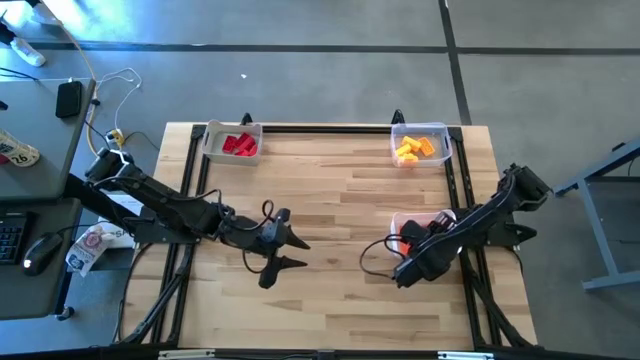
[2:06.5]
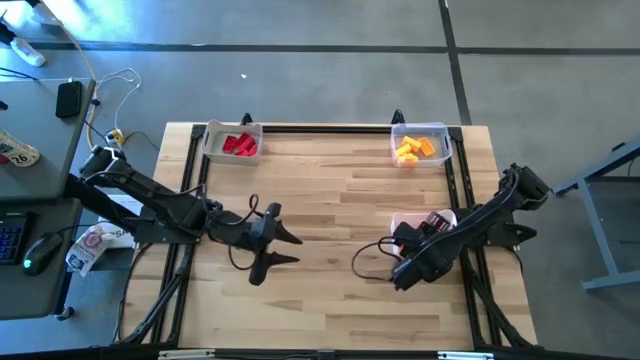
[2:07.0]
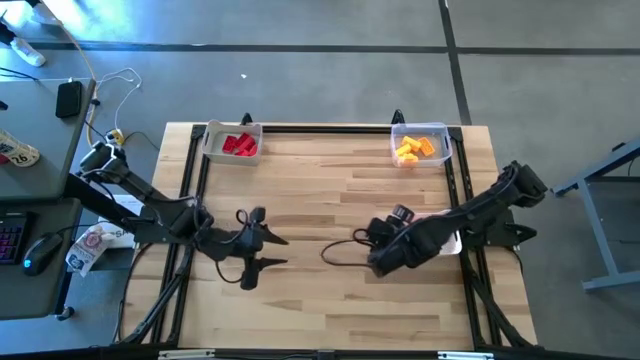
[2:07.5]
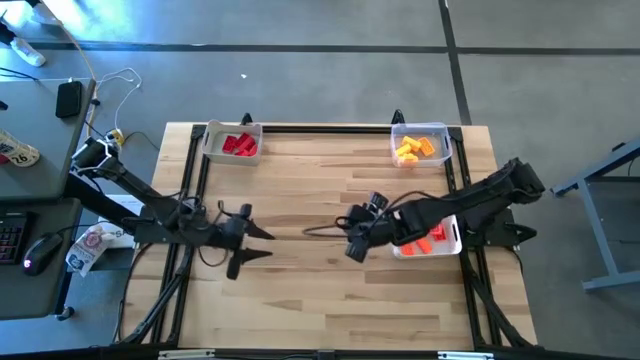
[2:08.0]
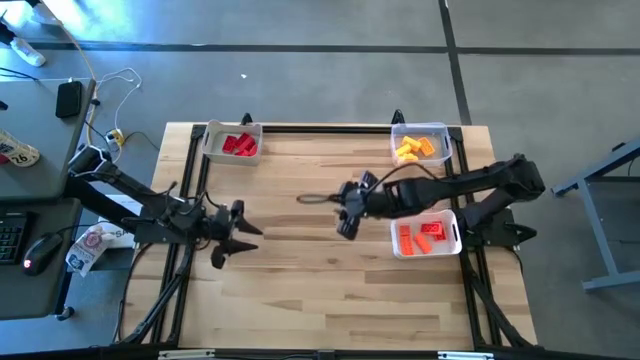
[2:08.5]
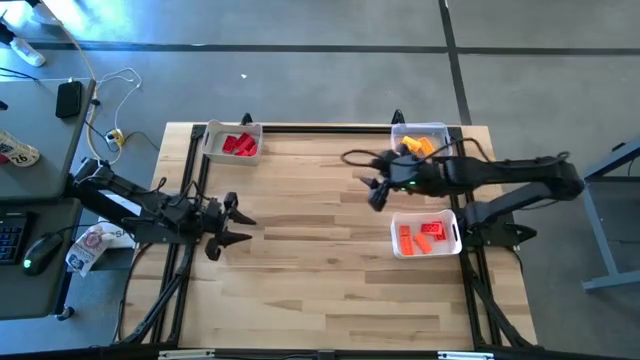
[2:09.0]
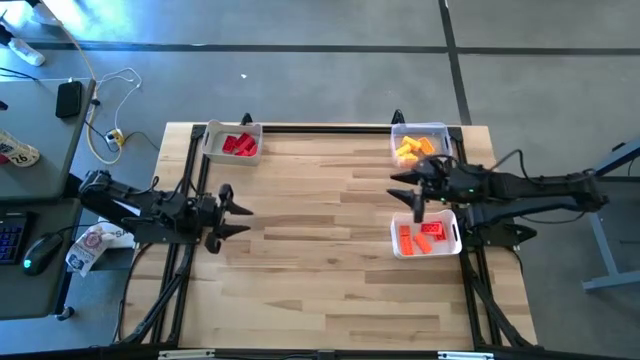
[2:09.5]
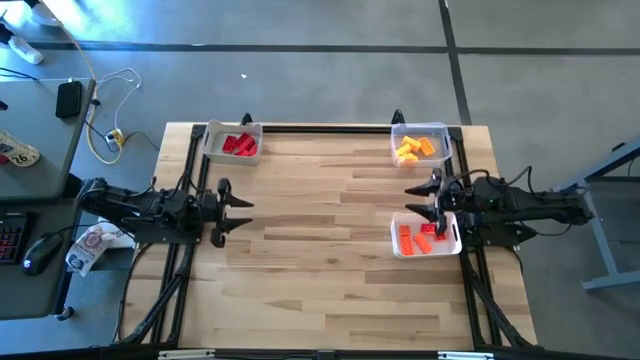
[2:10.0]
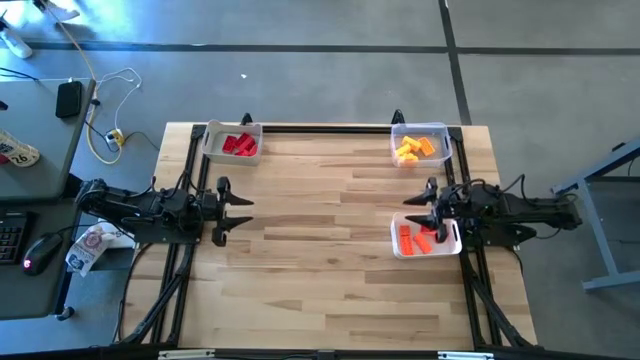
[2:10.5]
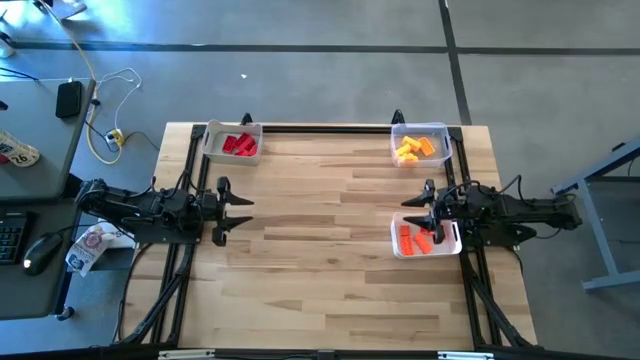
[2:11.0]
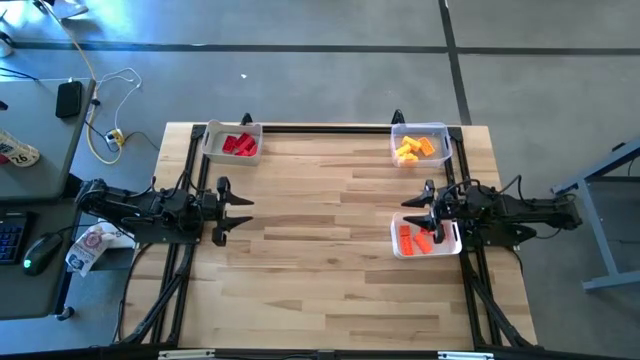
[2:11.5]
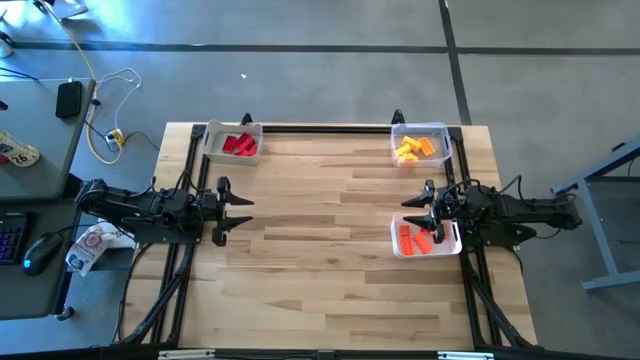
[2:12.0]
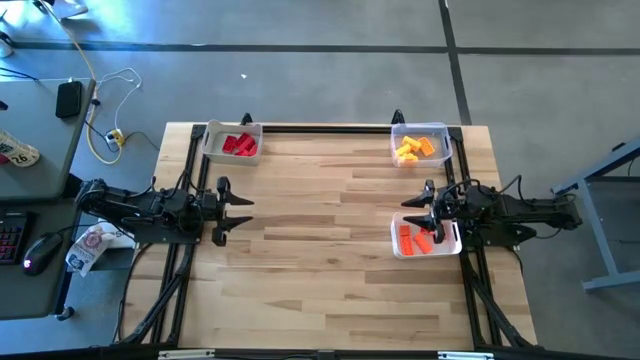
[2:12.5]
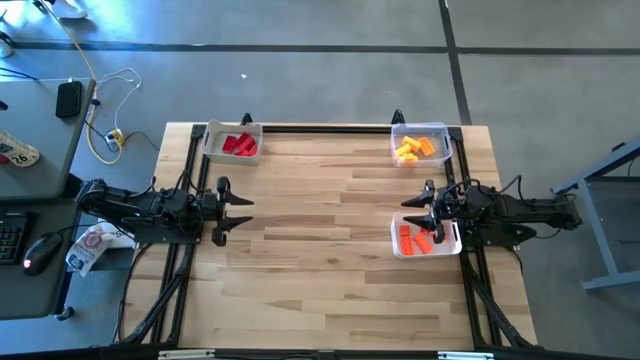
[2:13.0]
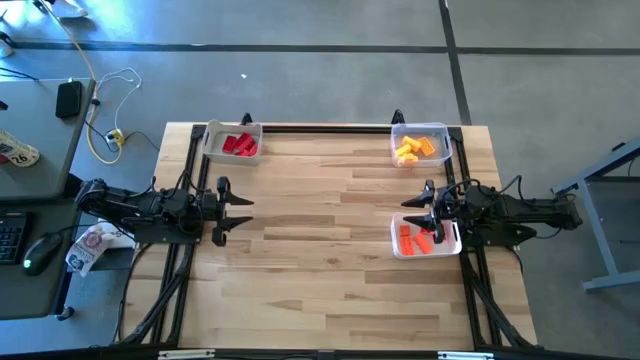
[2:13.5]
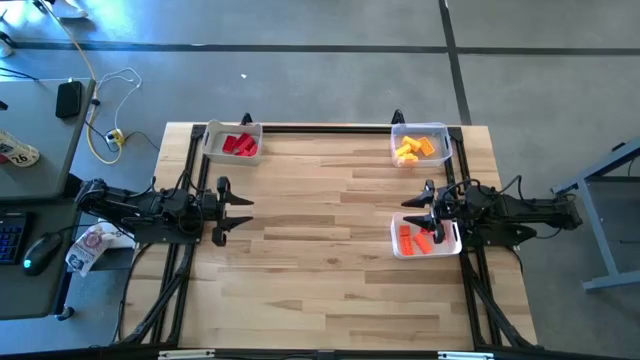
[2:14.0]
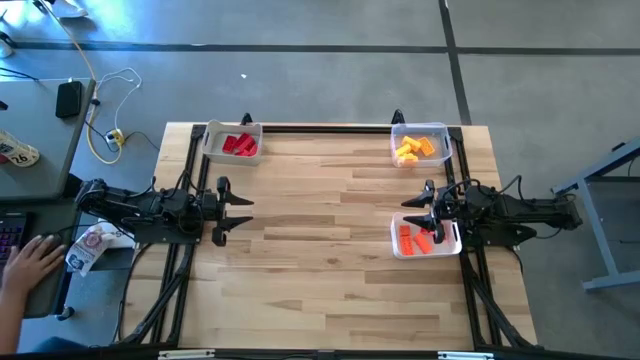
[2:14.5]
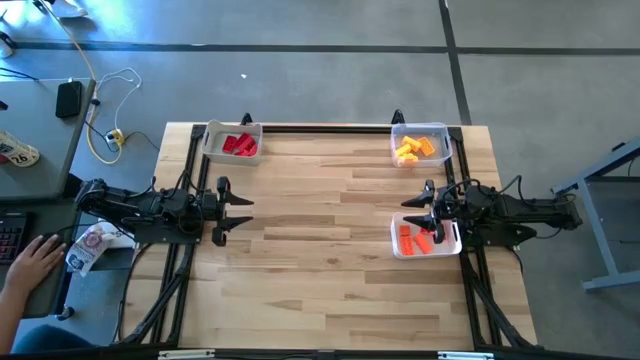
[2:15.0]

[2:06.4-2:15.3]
Task: Sort & place blocks by color
Return to Home Position

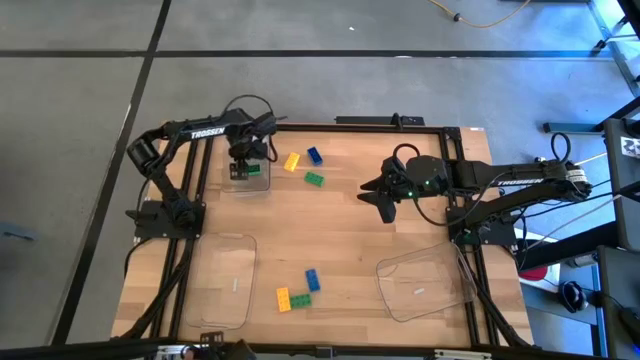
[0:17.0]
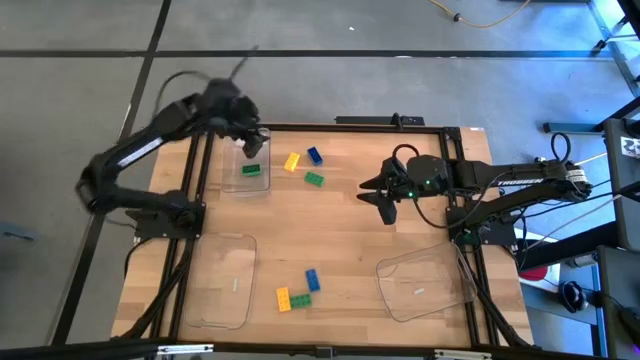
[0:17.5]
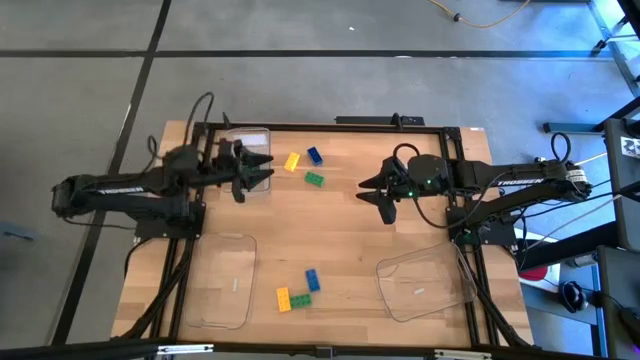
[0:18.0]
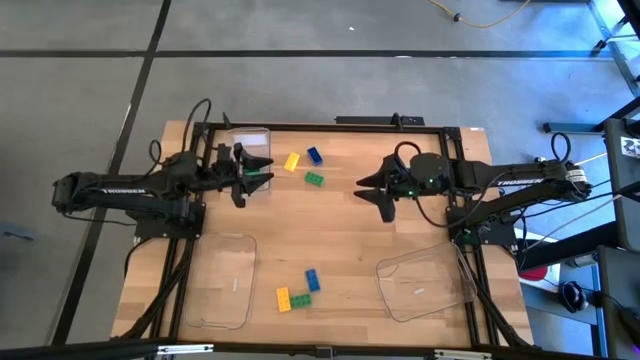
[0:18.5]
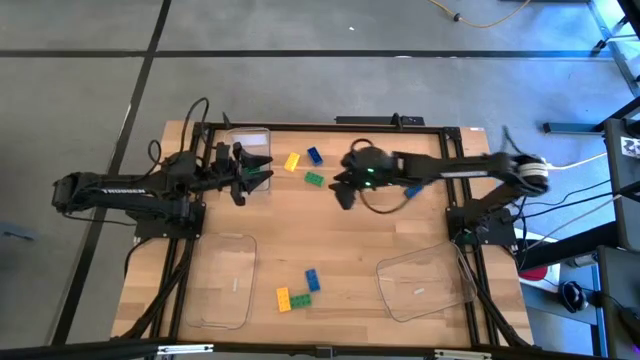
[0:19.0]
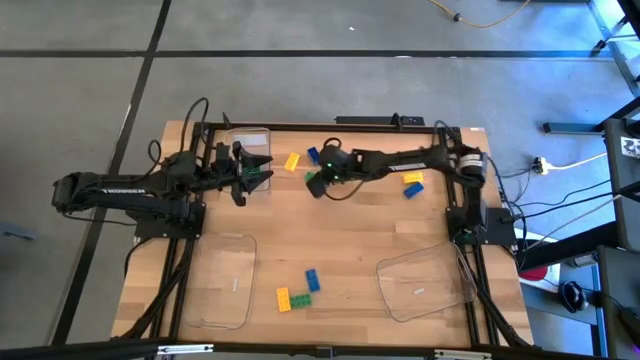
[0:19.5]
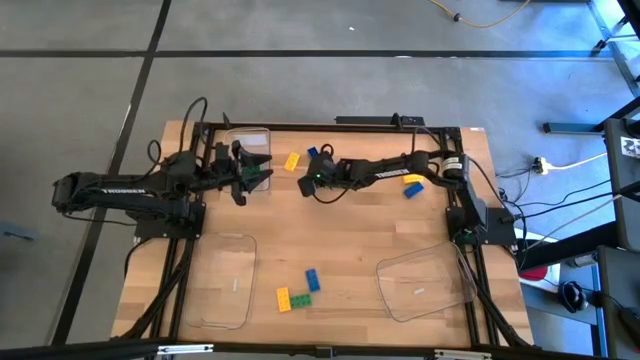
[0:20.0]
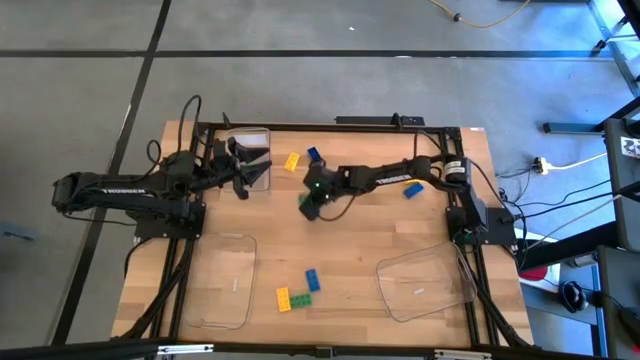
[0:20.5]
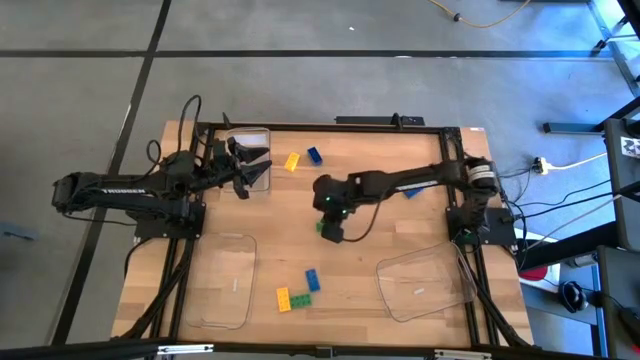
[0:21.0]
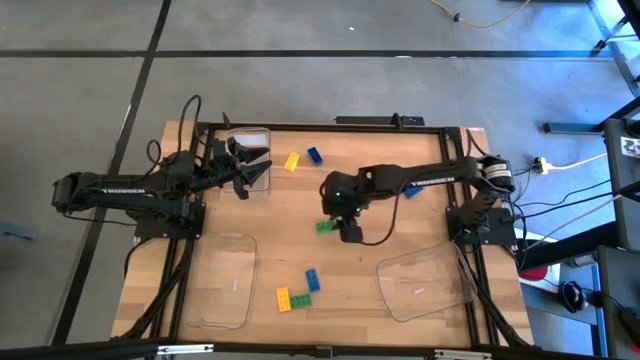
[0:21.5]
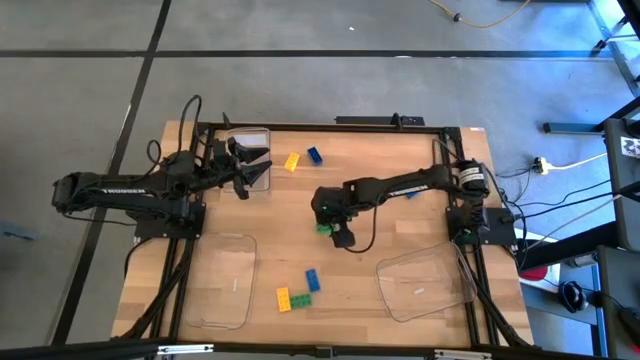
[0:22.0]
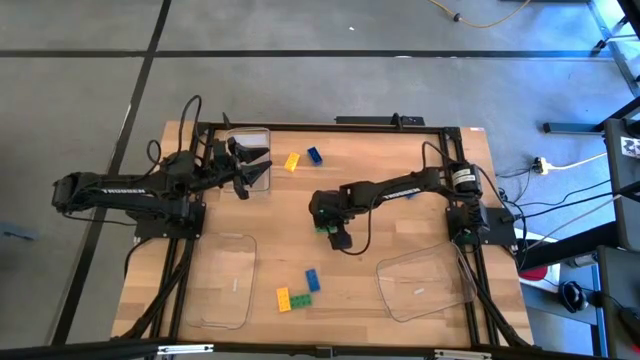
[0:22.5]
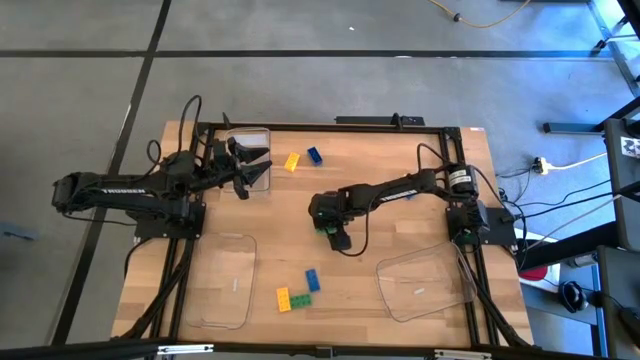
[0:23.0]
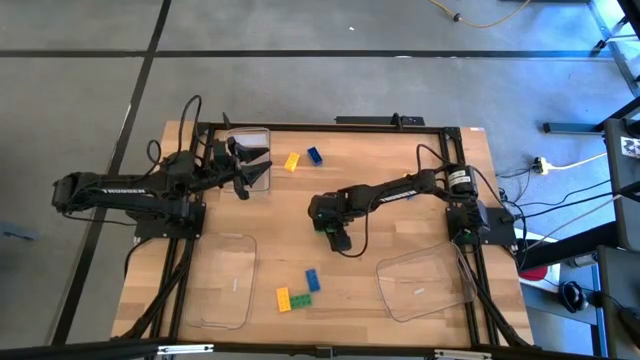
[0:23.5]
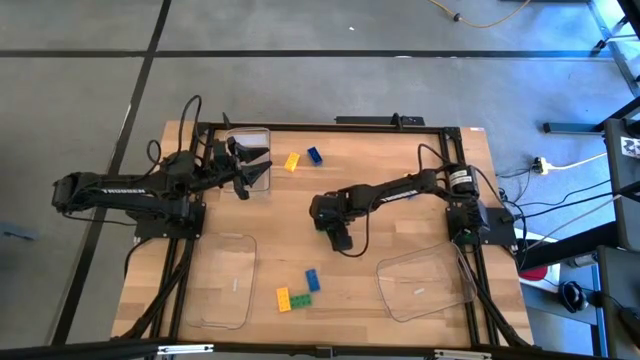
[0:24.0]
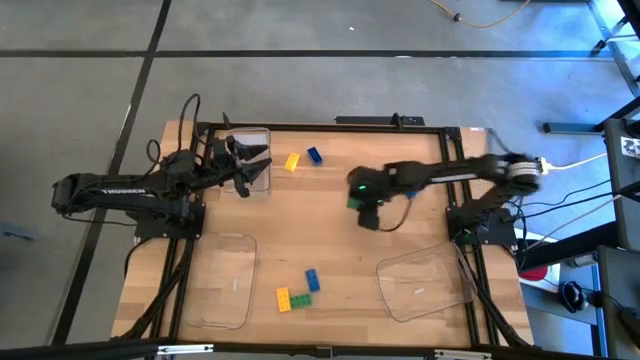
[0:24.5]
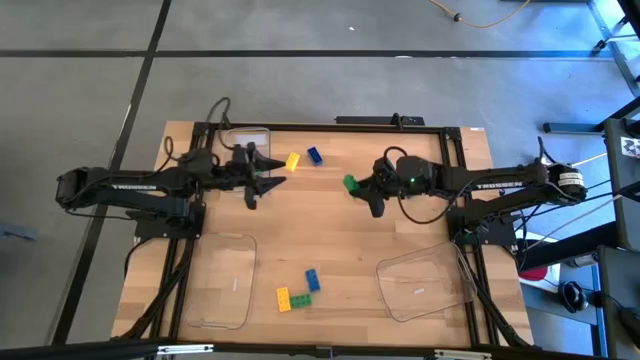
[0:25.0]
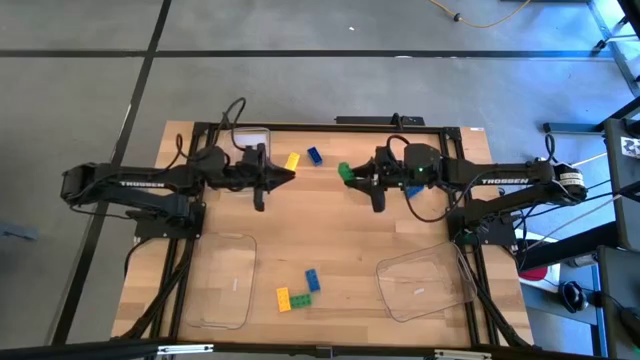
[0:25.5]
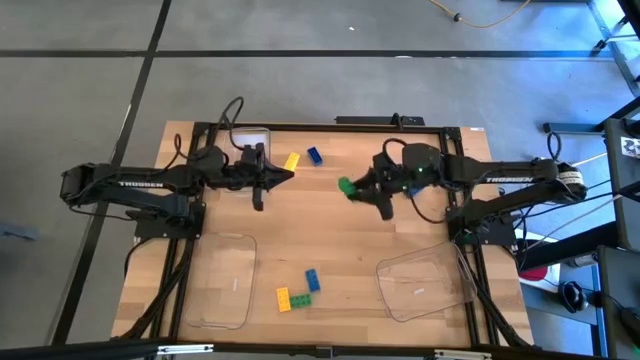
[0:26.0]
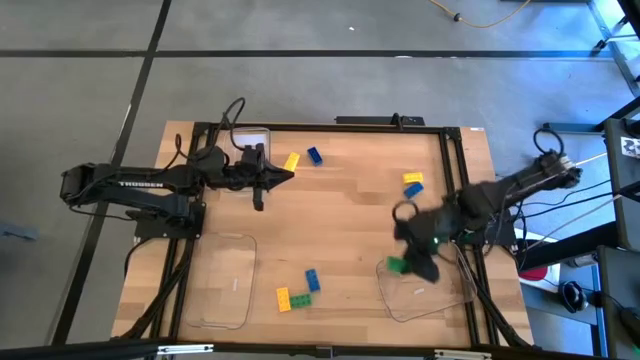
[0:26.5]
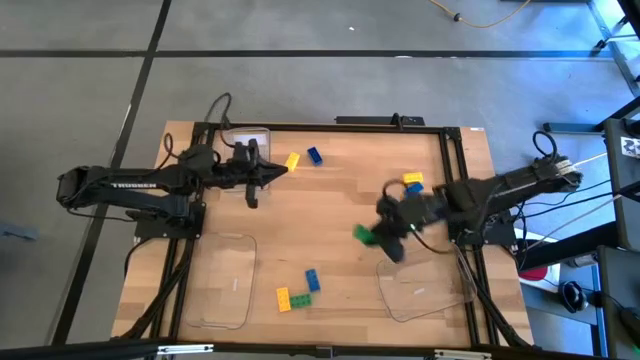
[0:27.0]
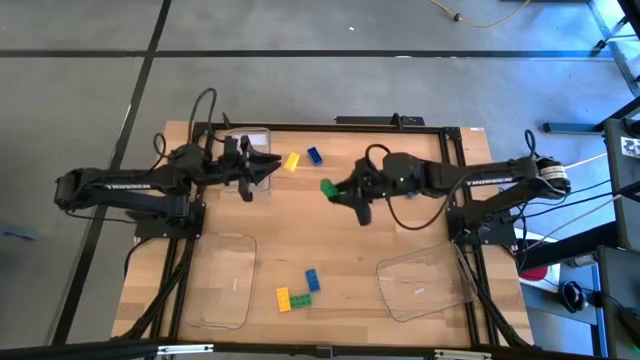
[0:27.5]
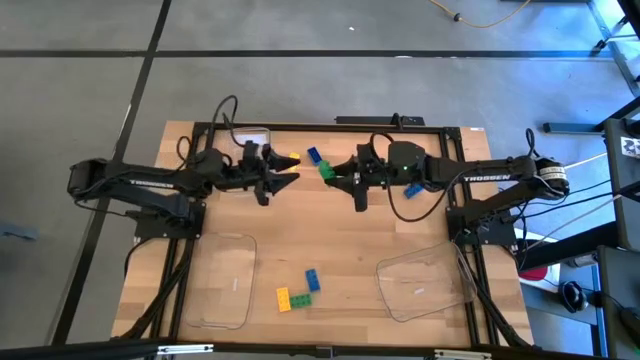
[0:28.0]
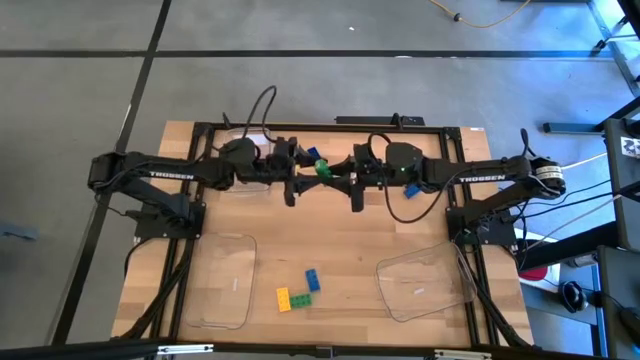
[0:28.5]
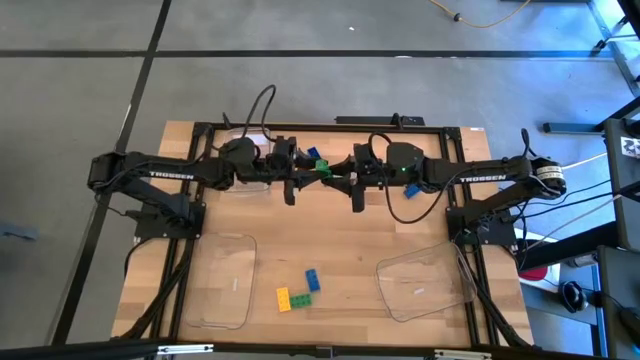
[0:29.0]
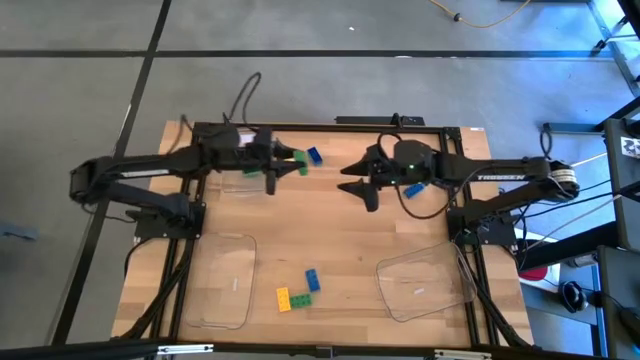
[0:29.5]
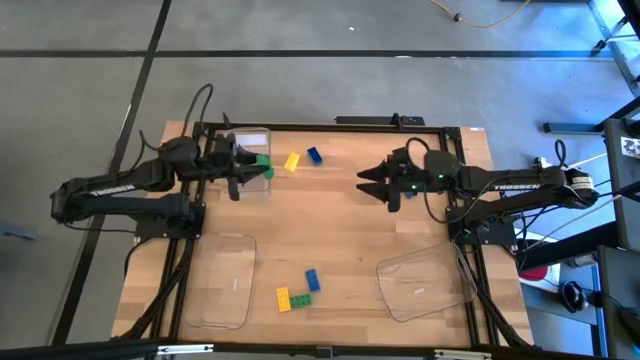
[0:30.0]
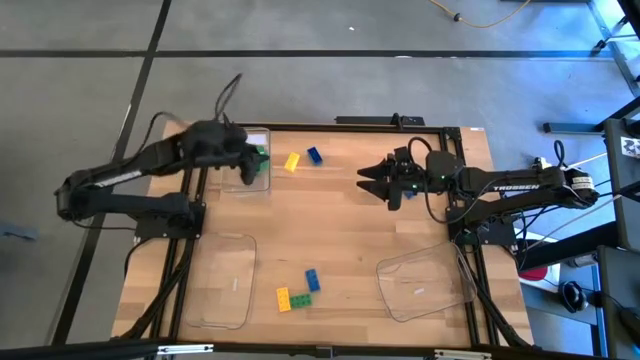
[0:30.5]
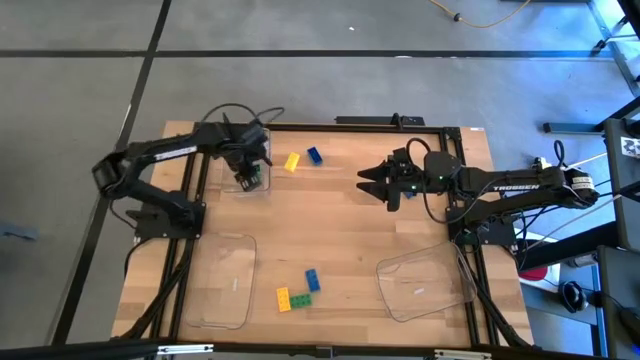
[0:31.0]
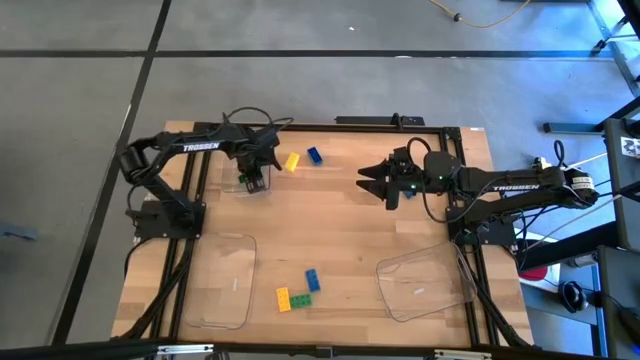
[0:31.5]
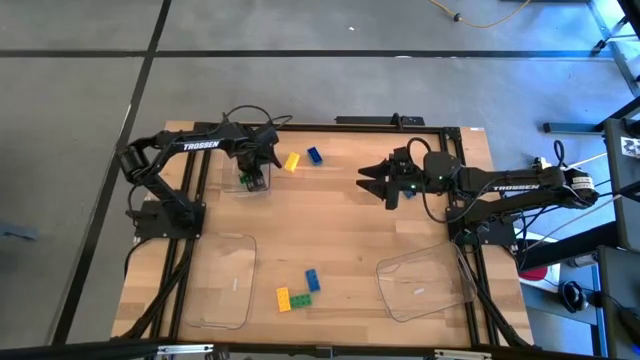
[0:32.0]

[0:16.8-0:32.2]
Task: Sort & place blocks by color
Put the top green game piece into the top left transparent bin
